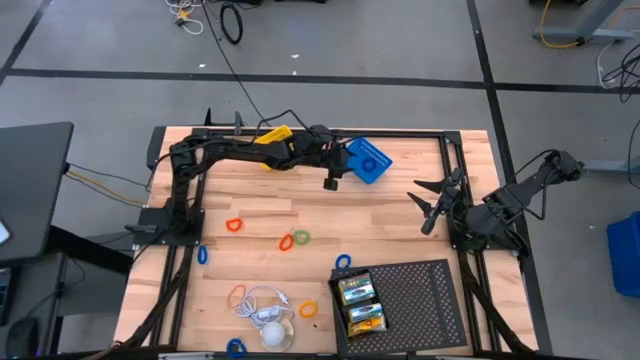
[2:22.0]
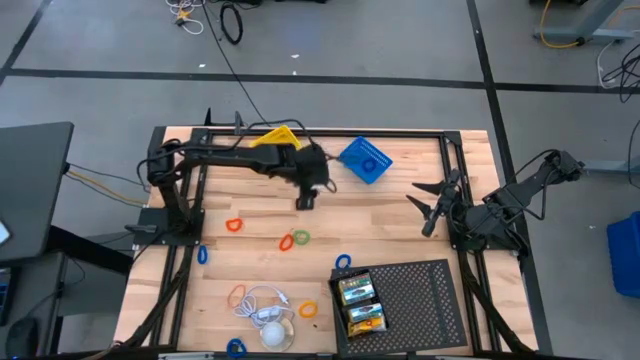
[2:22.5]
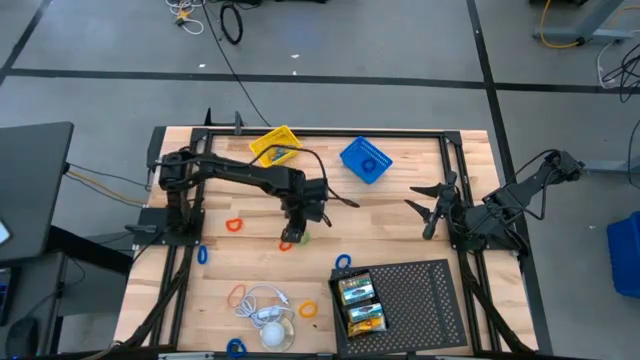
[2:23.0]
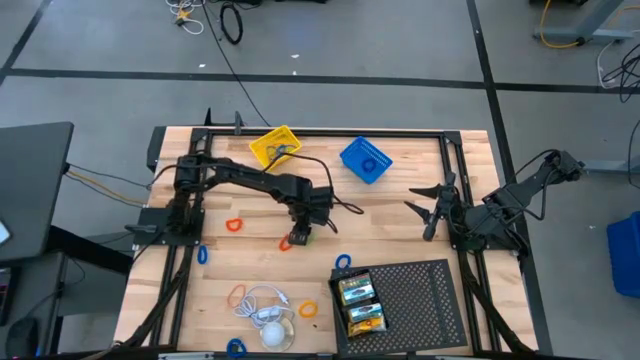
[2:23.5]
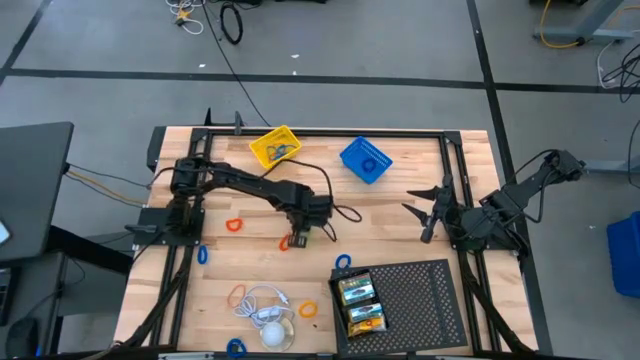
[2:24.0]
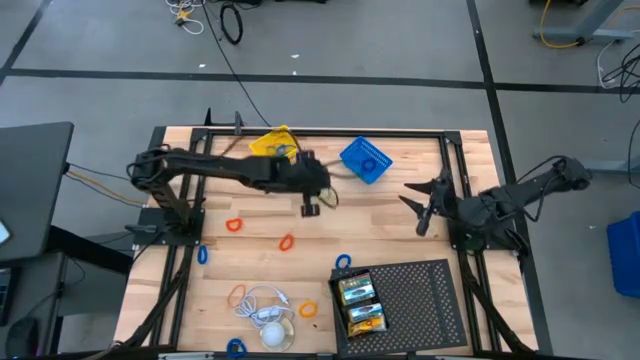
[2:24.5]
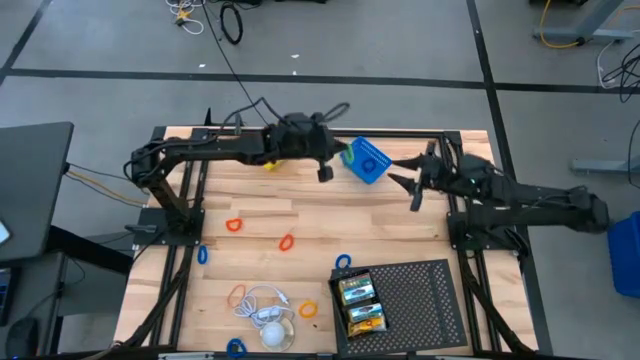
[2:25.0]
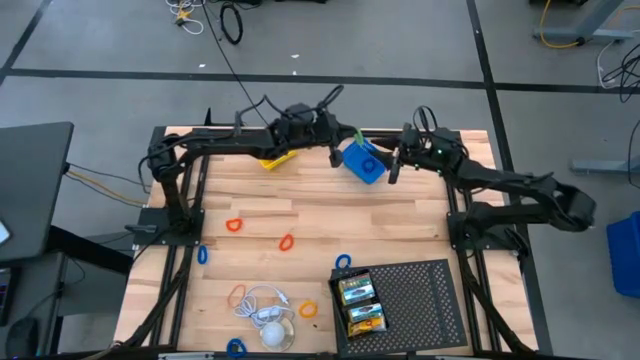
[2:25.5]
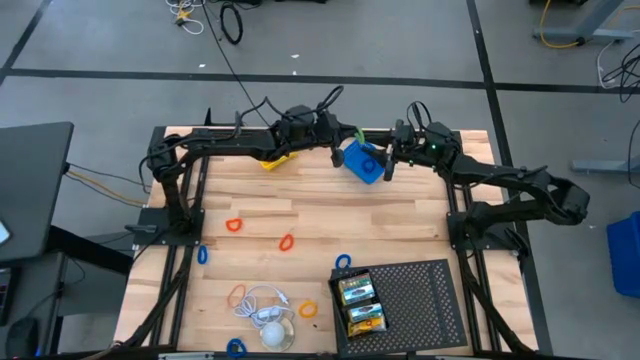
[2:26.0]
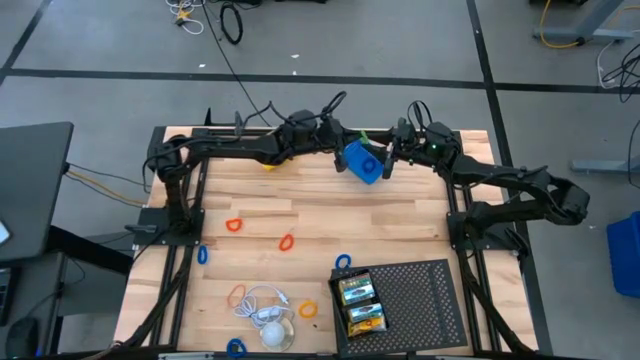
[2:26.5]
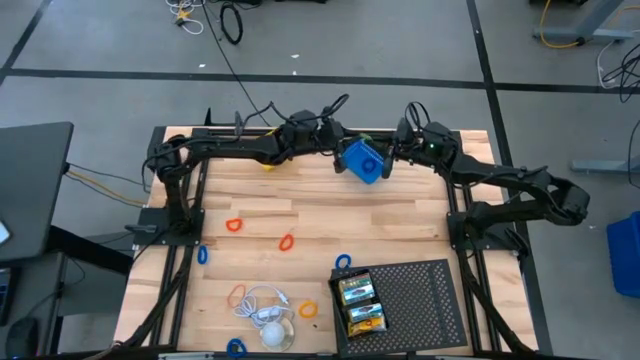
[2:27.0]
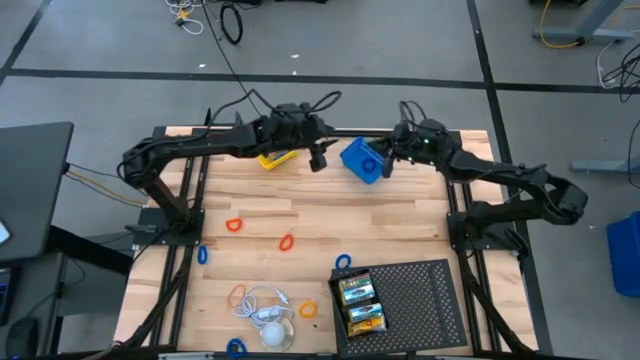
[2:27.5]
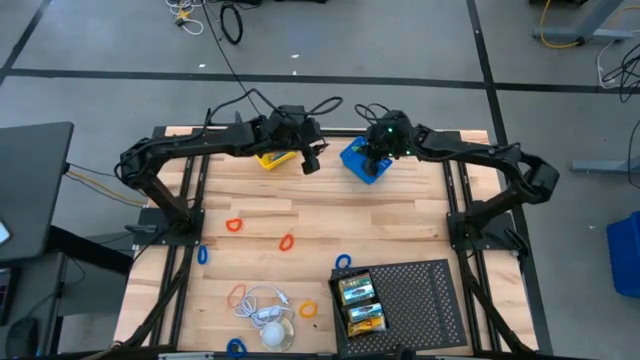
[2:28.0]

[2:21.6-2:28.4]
Task: Pick & Place Office Desk Supplies
Put the green spring keychain into the blue basket

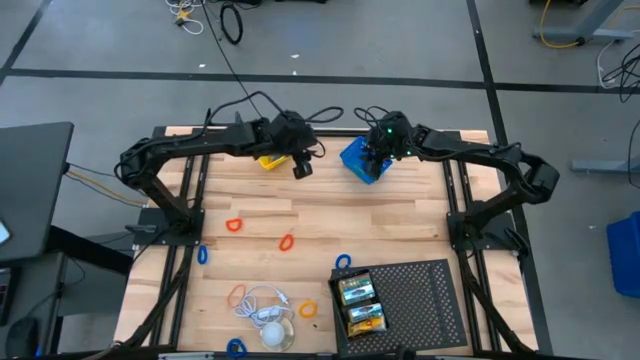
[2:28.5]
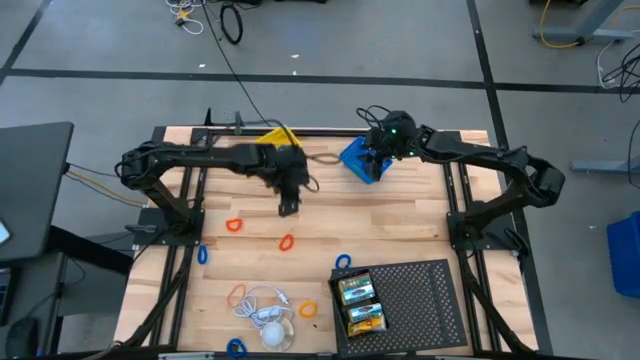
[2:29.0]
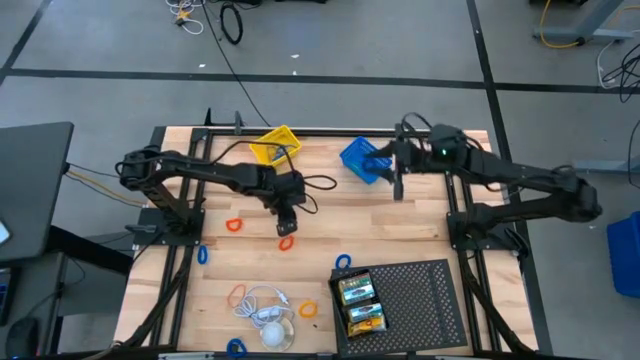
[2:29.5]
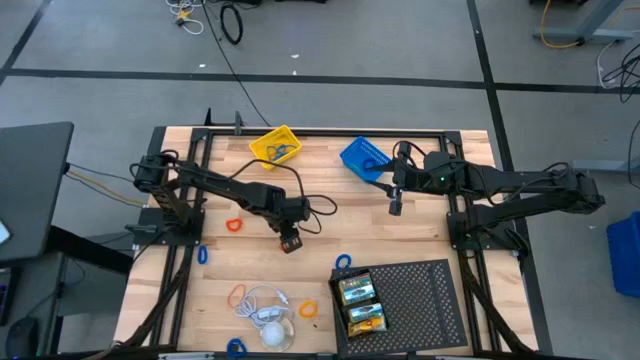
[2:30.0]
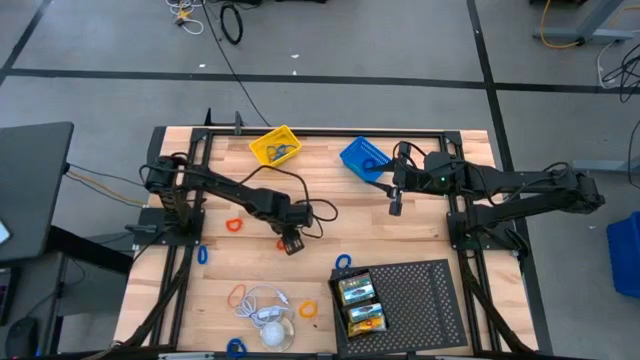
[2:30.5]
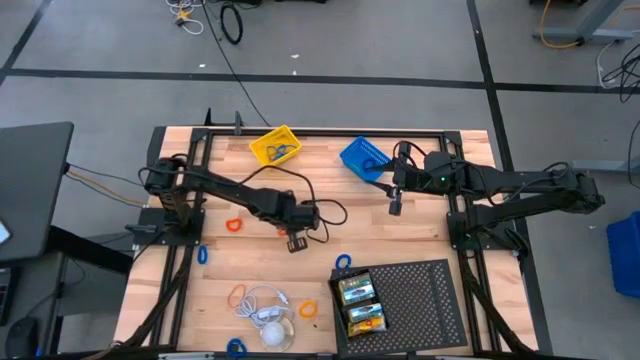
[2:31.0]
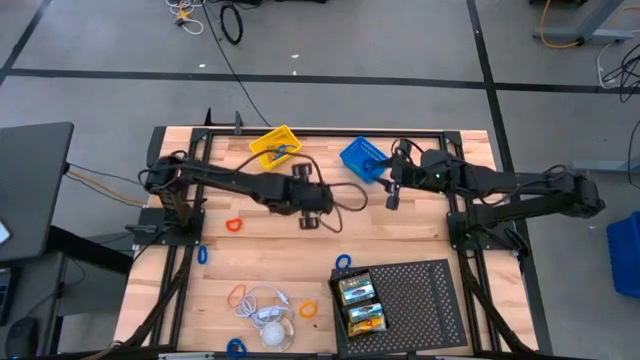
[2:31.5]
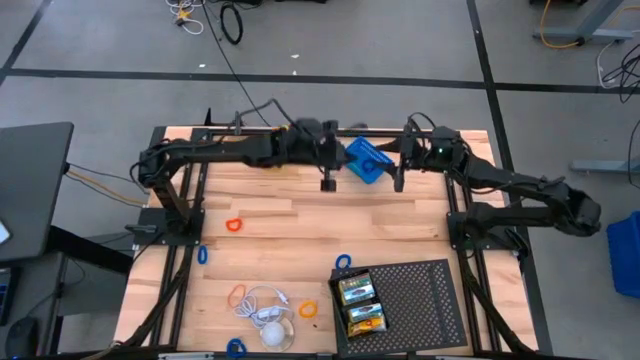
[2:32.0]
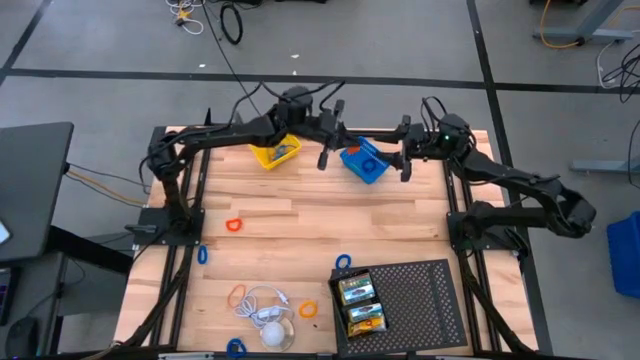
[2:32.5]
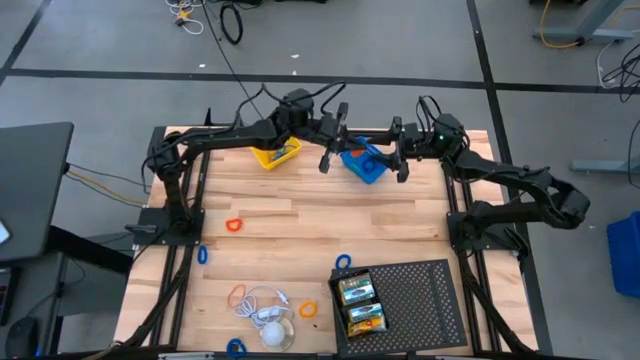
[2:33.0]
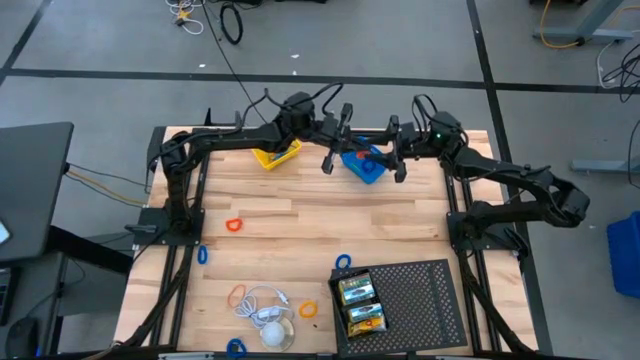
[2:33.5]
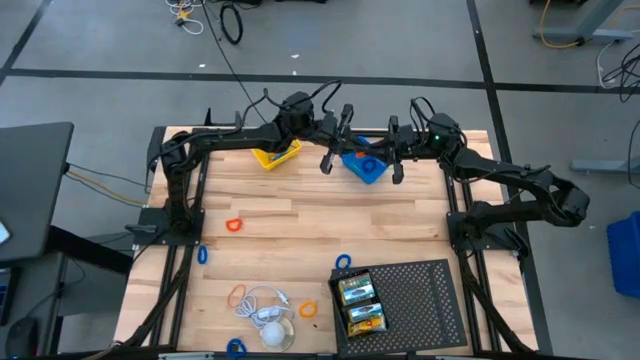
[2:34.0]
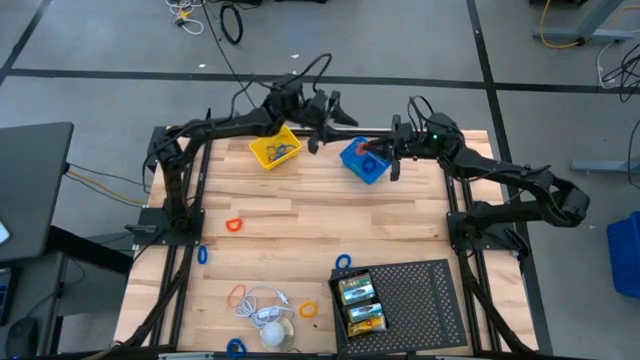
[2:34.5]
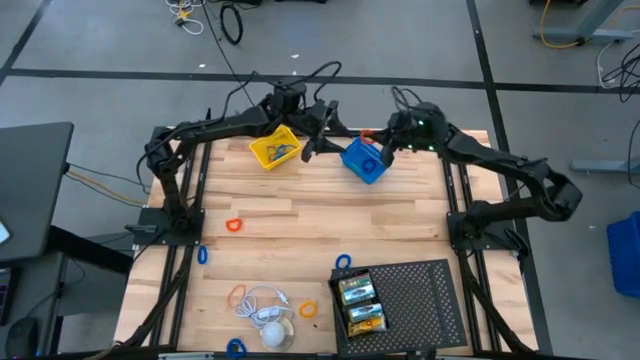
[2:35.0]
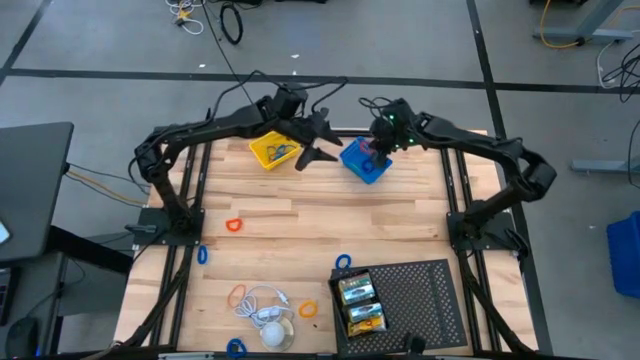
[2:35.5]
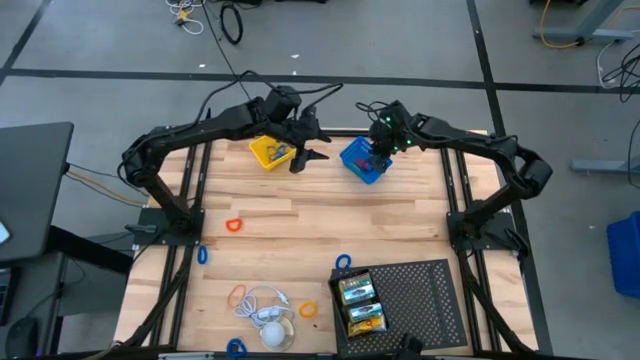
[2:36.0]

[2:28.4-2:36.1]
Put the orange spring keychain into the blue basket

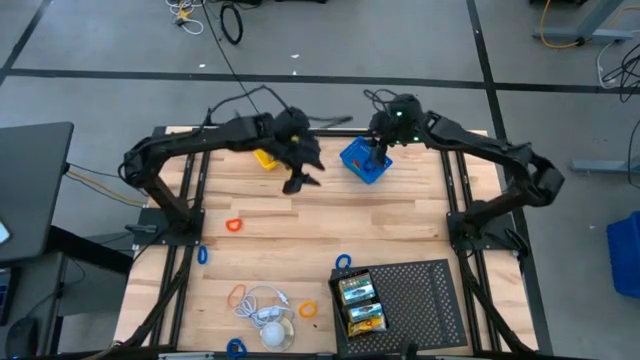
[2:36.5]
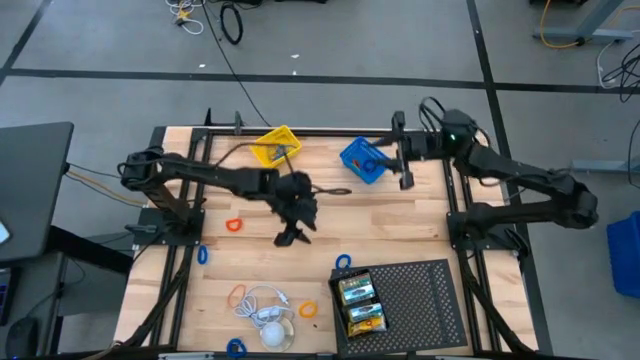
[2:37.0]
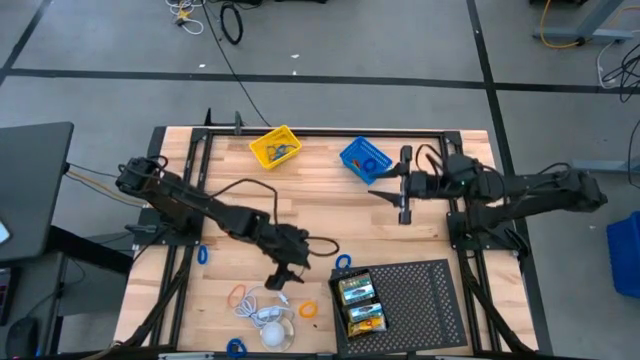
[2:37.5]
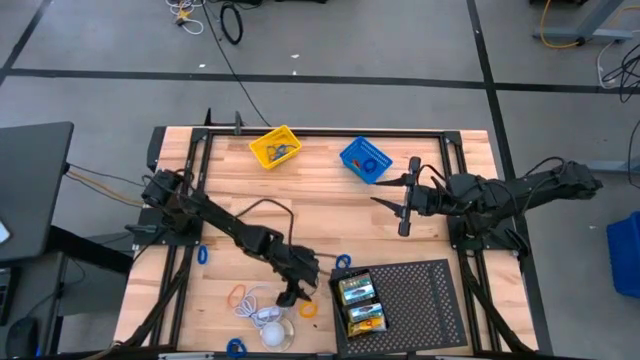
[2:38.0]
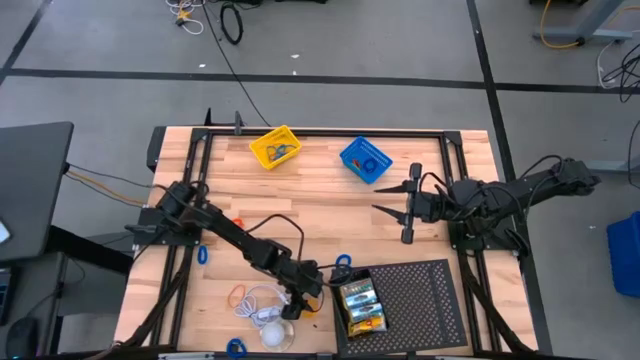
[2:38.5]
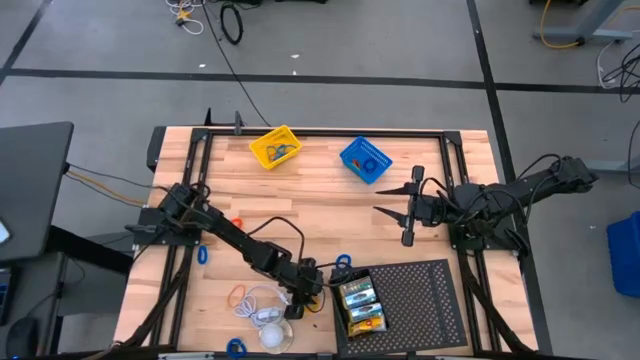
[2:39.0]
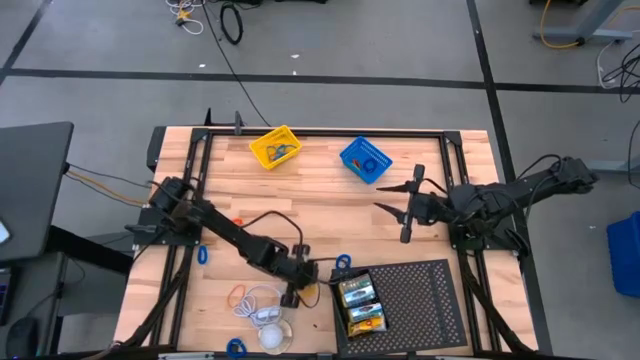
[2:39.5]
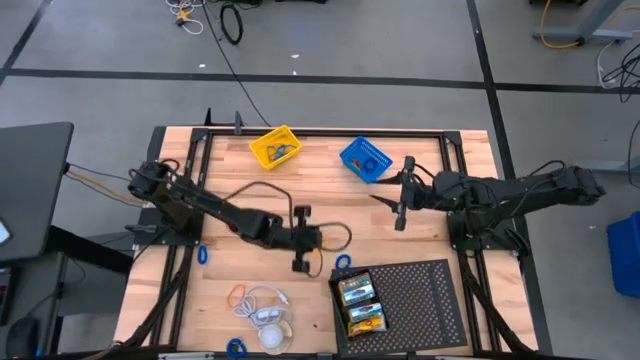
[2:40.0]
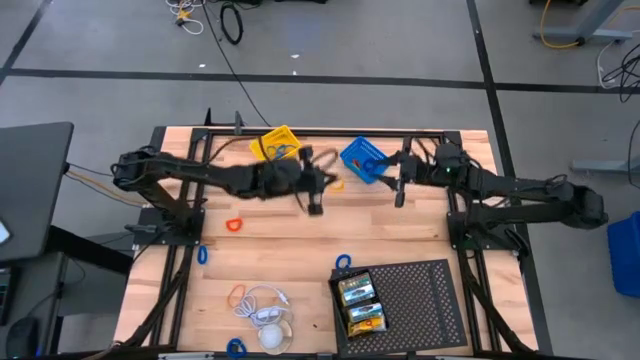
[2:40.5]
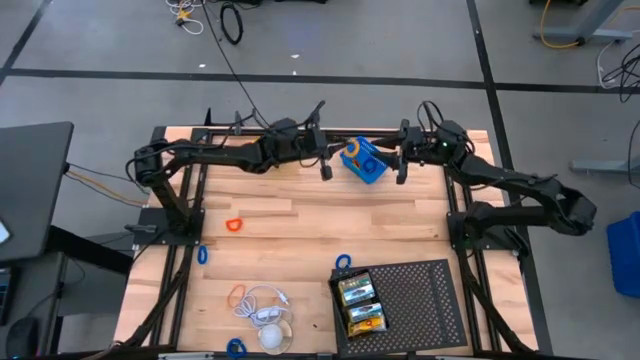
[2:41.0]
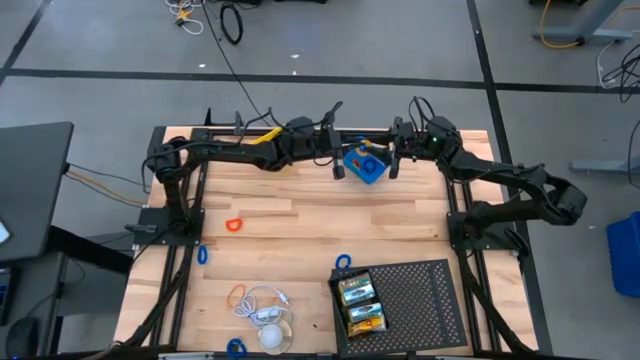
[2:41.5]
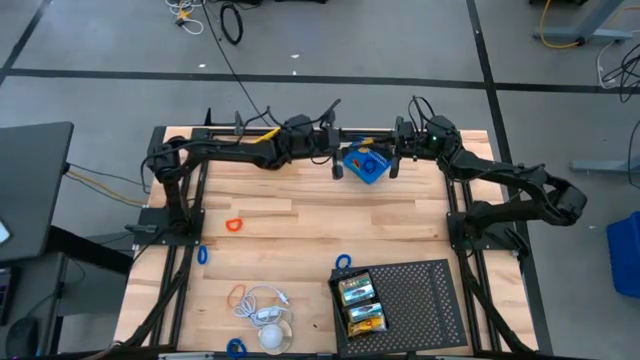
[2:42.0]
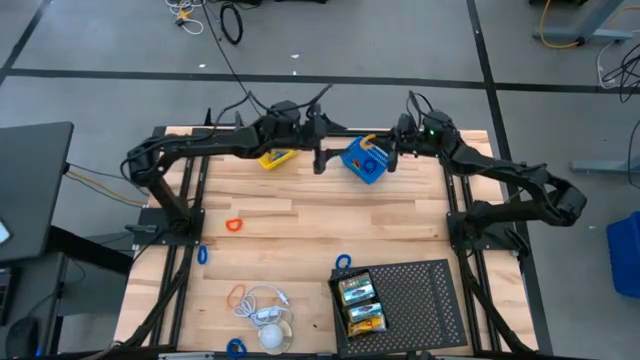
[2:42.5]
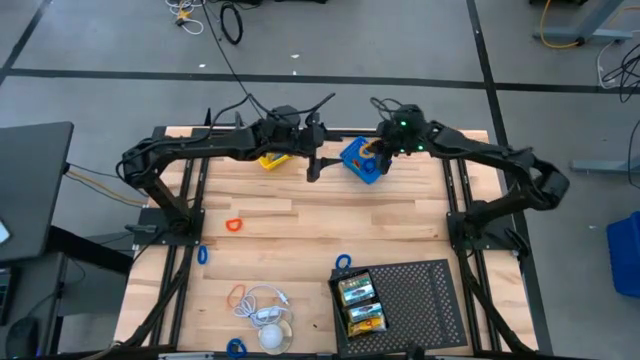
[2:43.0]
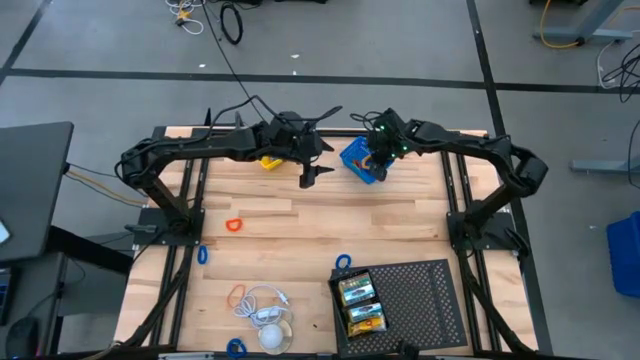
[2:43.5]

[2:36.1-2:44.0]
Put the yellow spring keychain into the blue basket
